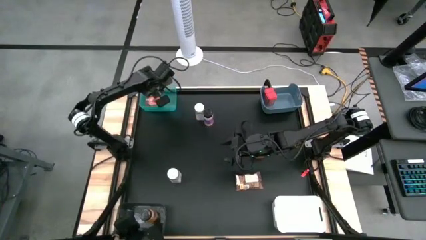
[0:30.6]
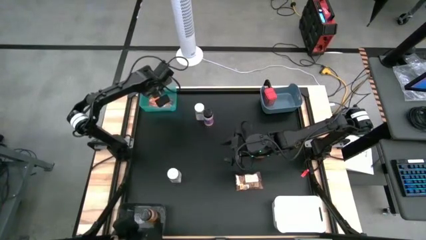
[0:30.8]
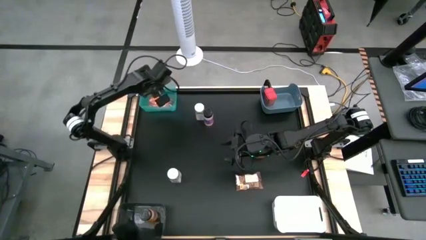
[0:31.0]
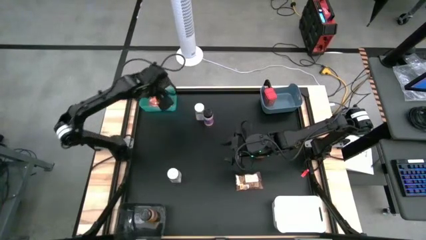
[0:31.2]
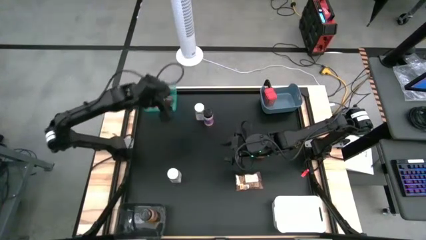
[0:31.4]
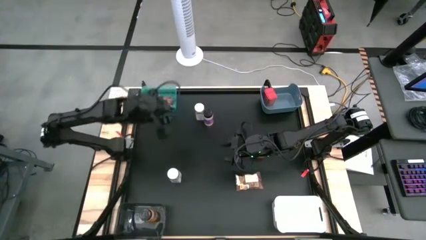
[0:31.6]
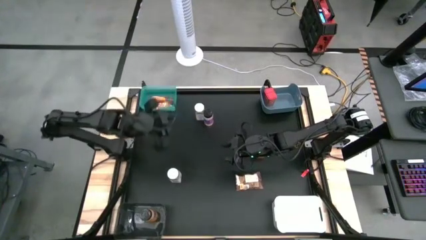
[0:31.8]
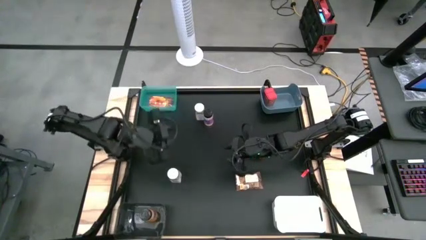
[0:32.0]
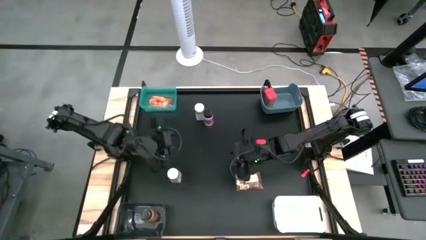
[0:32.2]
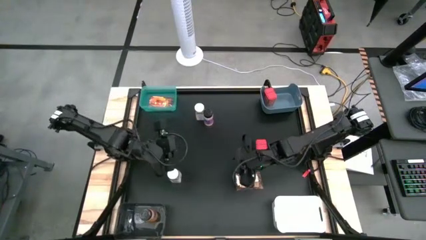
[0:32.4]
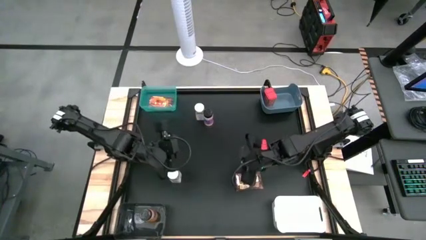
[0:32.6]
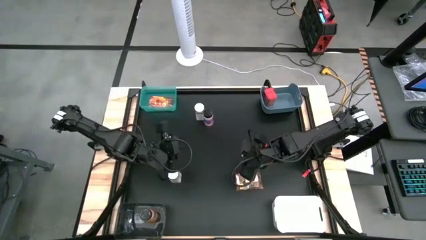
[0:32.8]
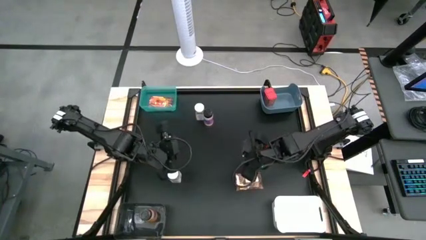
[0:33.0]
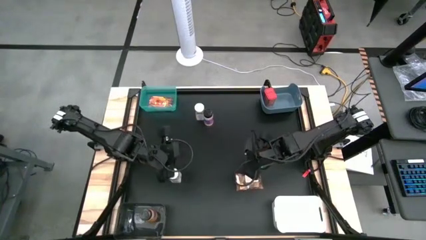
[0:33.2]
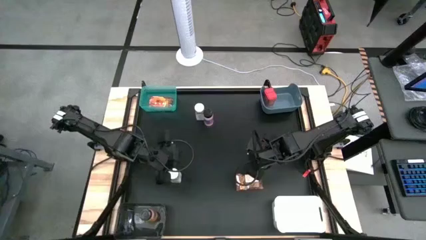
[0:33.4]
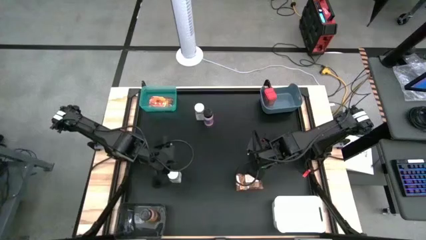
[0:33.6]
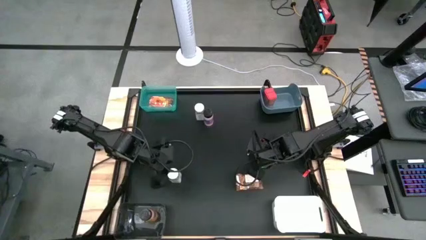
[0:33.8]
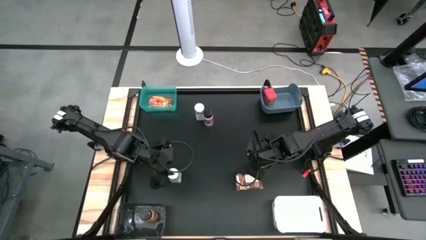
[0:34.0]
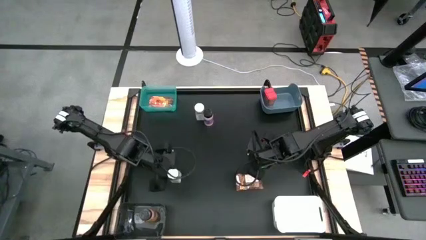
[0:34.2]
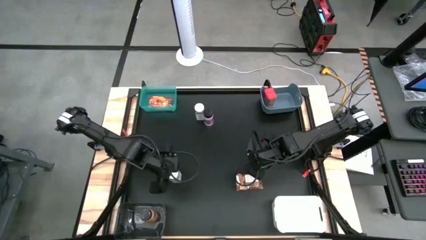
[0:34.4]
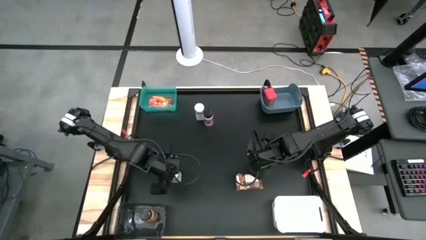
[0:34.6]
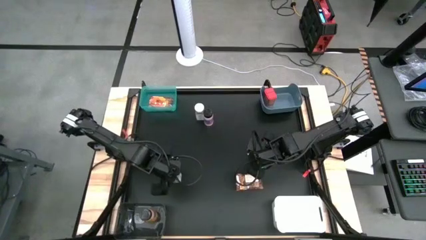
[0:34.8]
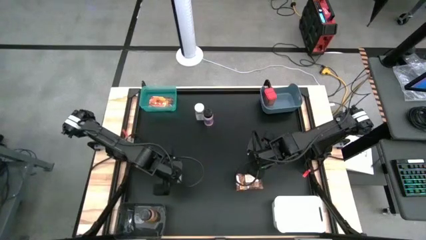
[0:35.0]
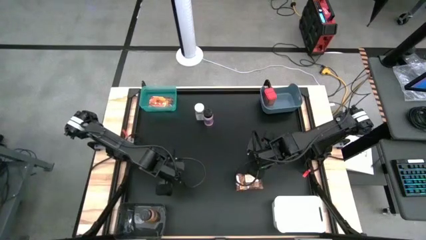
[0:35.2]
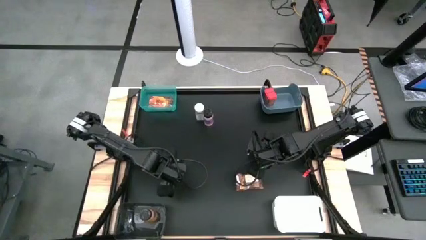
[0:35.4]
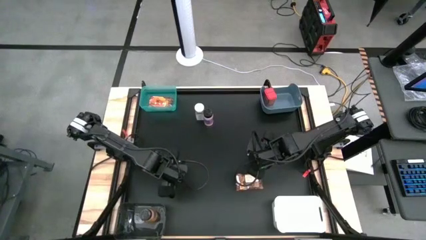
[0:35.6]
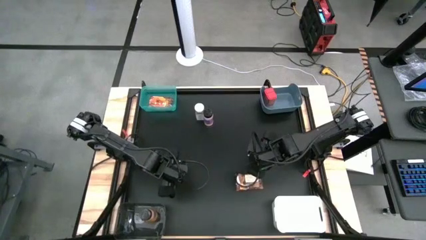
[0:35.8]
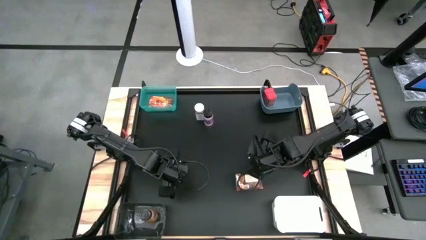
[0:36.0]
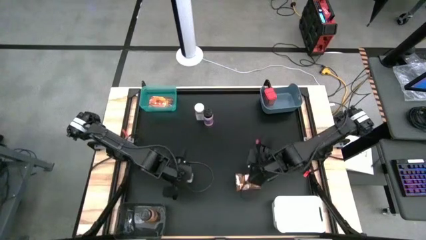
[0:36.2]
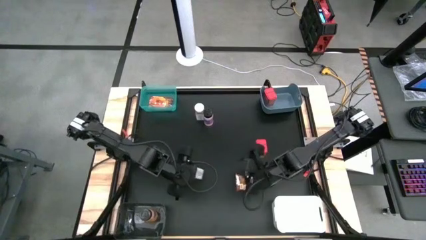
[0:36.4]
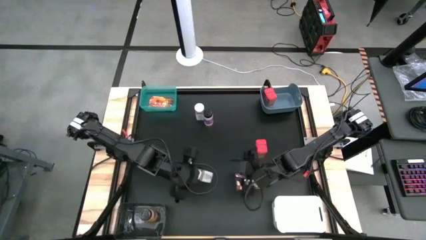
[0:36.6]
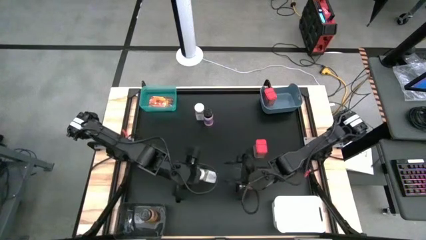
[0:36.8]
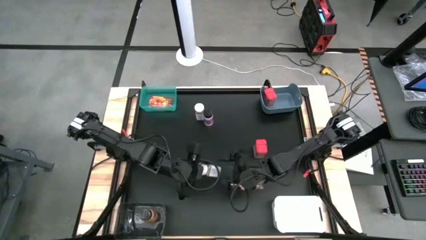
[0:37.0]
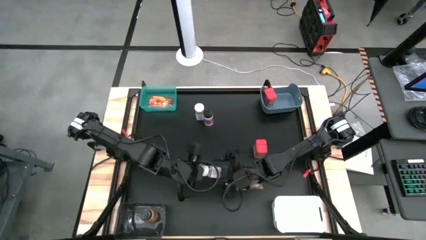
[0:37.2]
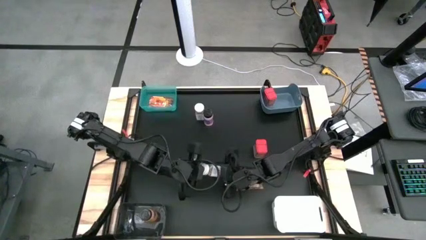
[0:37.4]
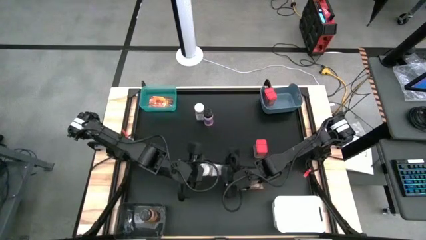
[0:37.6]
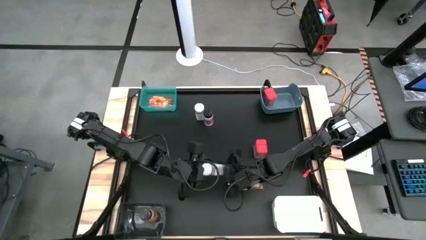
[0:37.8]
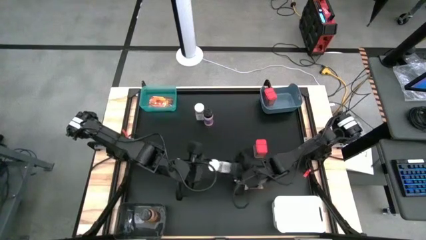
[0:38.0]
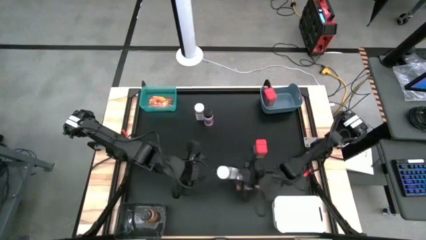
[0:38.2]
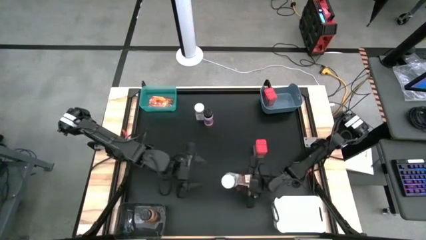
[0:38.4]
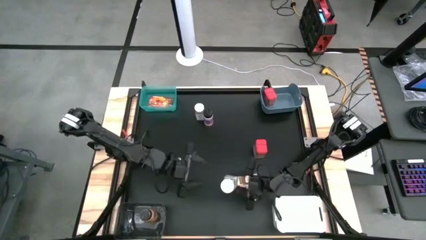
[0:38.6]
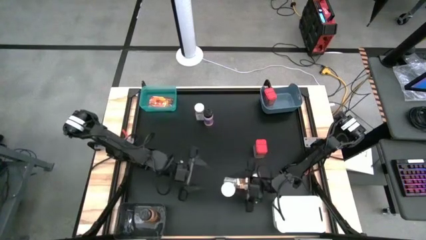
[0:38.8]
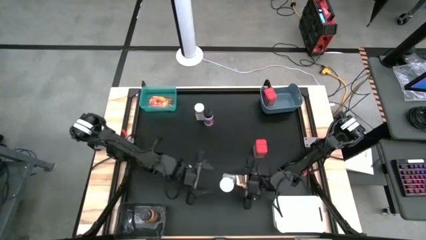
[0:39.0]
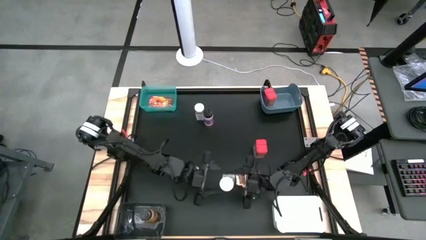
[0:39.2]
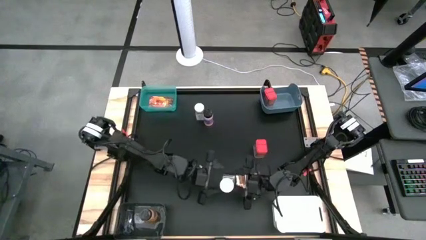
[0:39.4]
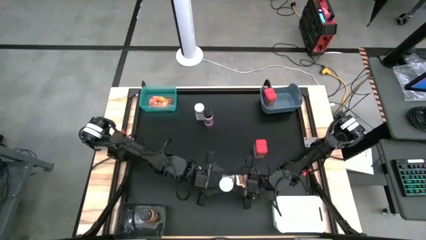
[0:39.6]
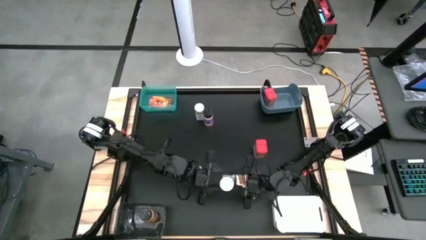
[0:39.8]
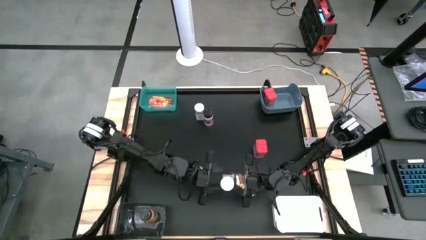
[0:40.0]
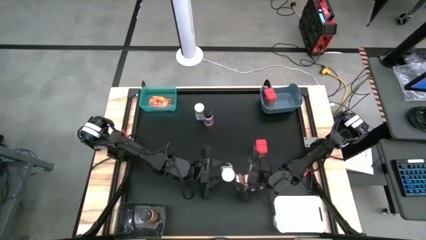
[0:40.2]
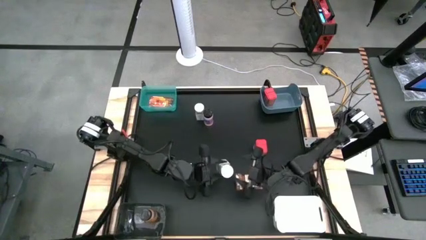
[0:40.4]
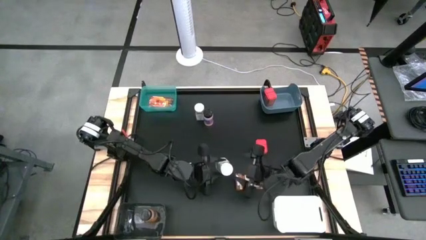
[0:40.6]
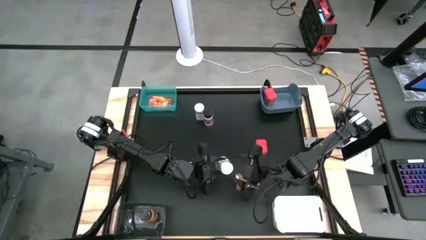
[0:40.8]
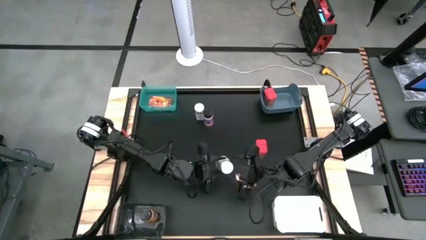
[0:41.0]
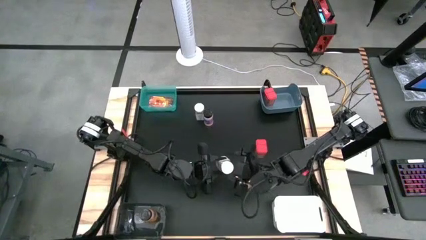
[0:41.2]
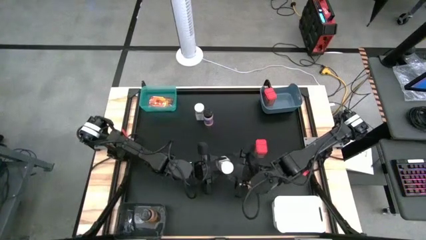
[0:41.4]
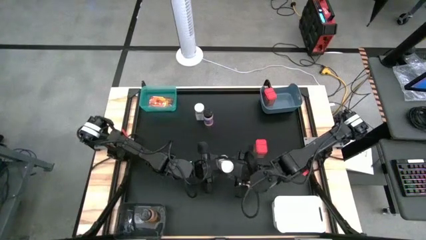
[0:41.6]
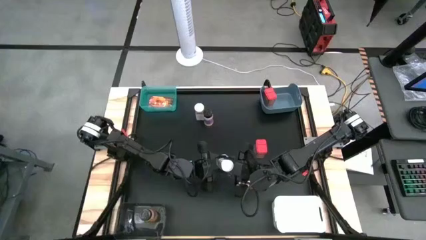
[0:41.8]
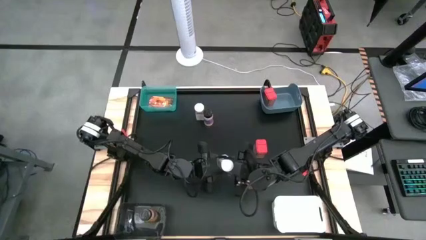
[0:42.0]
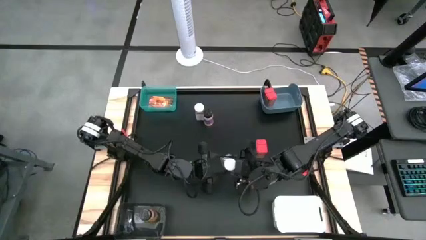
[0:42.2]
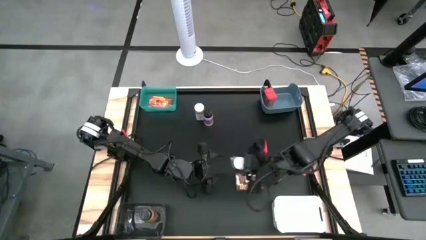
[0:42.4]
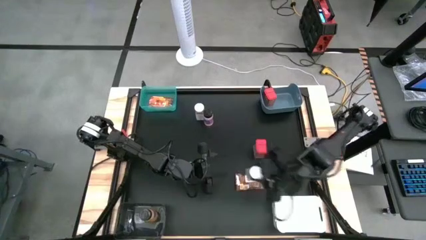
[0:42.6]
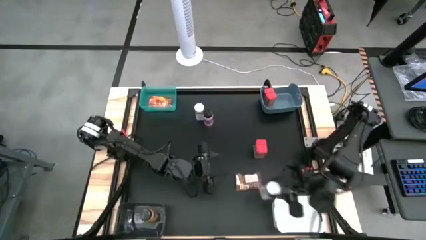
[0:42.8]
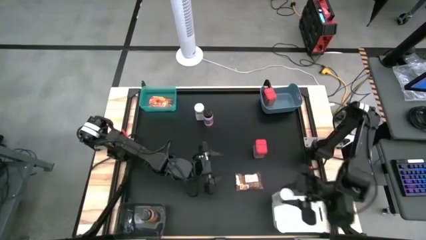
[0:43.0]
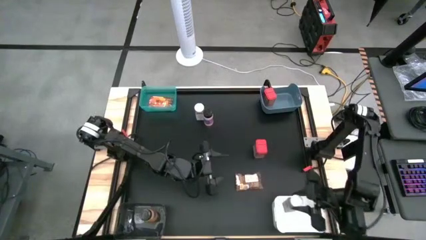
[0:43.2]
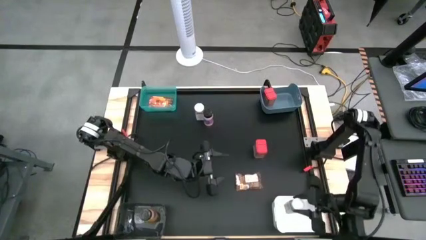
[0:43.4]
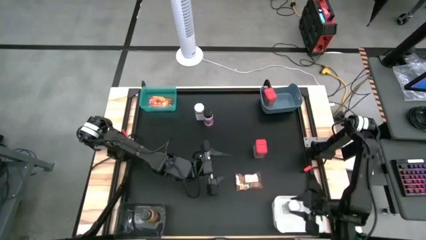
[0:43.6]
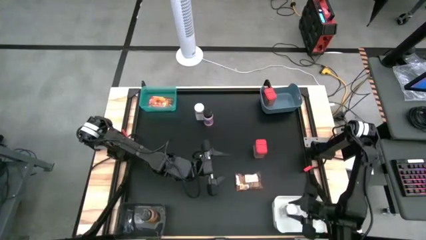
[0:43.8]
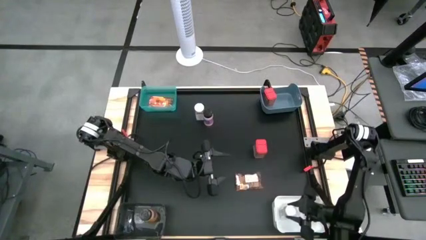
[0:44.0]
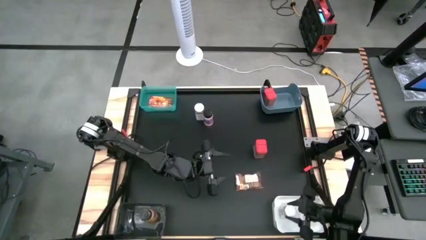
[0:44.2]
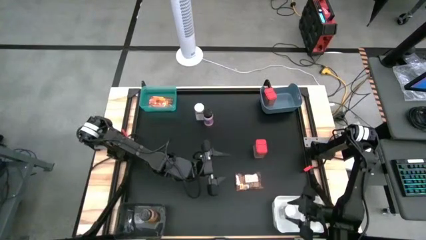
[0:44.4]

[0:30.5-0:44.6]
Task: Sort spices by type
Put the bottom white seasoning bottle into the white bin
